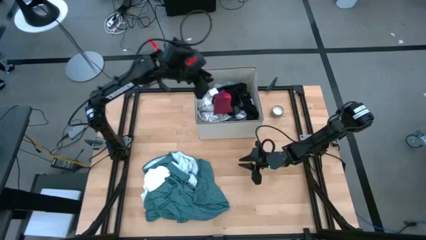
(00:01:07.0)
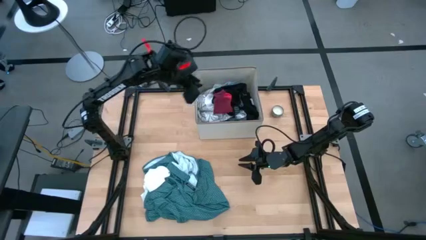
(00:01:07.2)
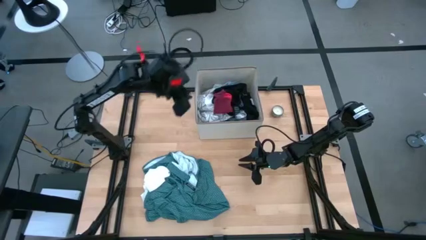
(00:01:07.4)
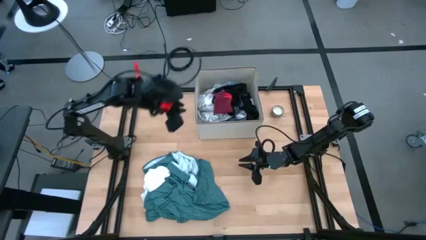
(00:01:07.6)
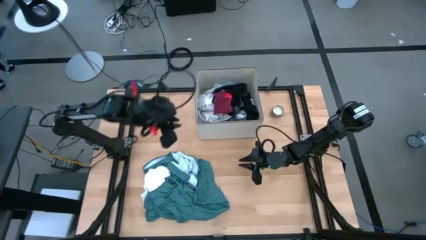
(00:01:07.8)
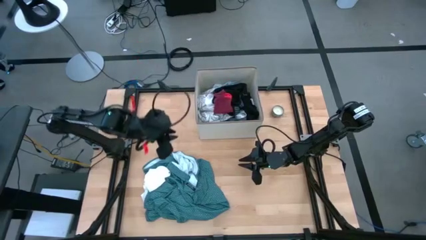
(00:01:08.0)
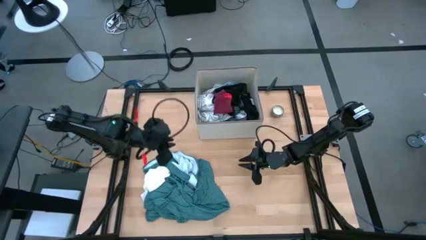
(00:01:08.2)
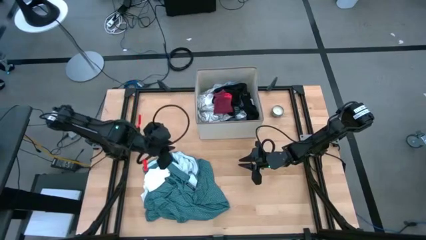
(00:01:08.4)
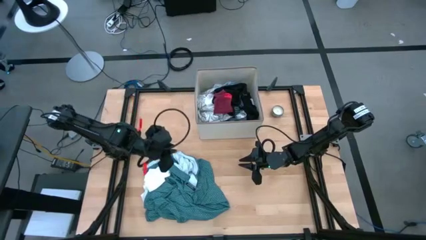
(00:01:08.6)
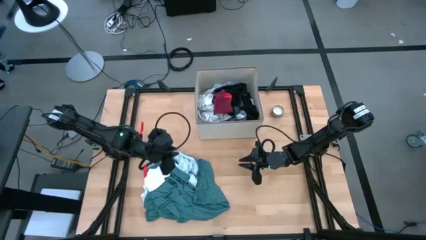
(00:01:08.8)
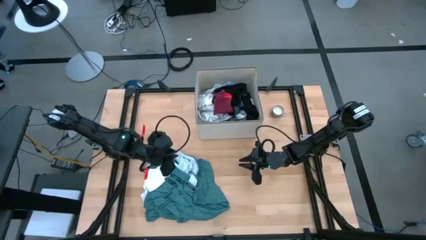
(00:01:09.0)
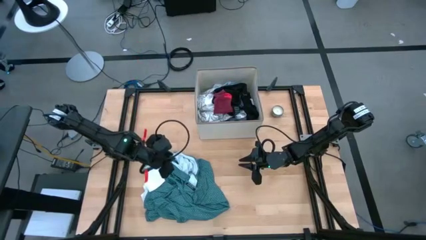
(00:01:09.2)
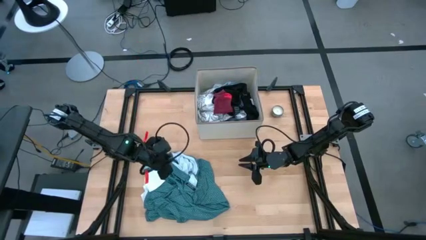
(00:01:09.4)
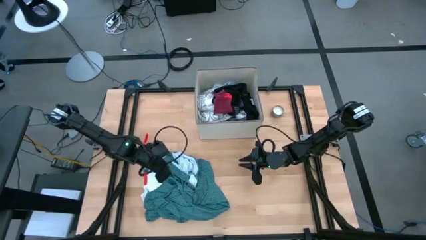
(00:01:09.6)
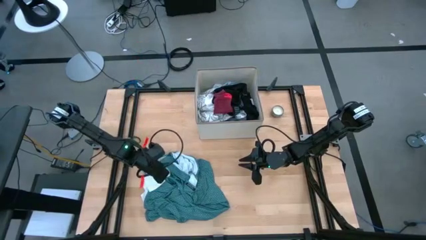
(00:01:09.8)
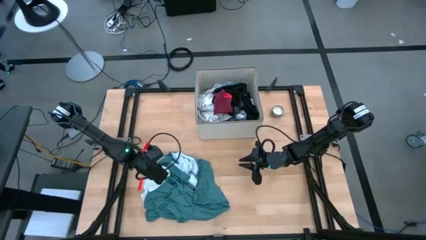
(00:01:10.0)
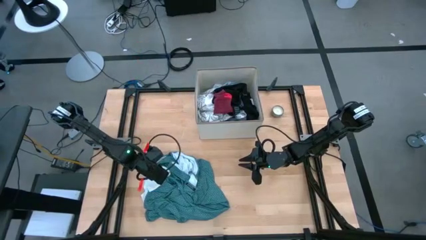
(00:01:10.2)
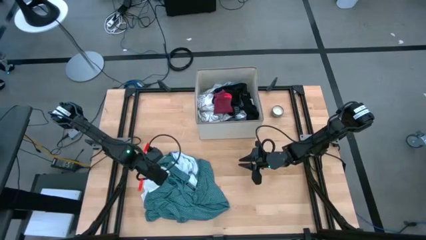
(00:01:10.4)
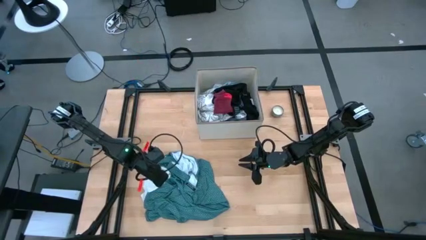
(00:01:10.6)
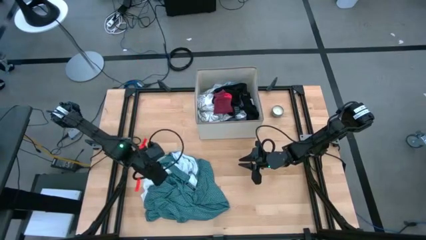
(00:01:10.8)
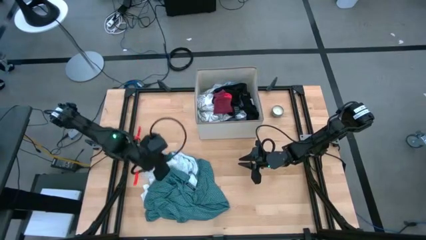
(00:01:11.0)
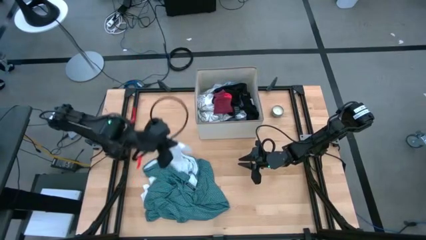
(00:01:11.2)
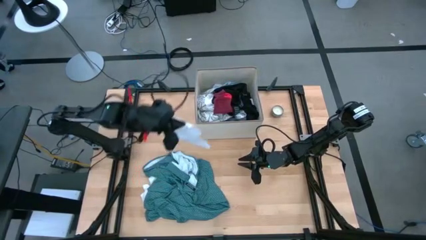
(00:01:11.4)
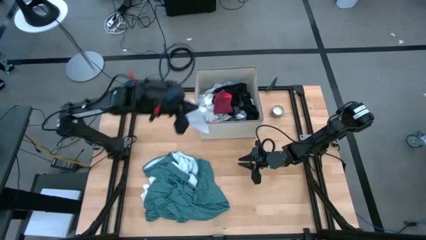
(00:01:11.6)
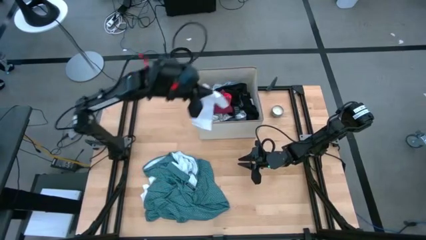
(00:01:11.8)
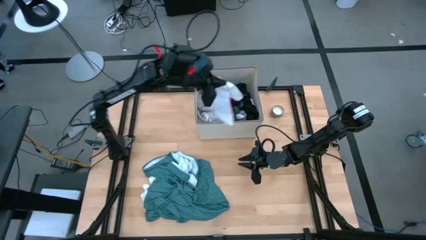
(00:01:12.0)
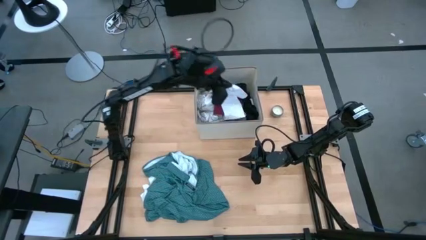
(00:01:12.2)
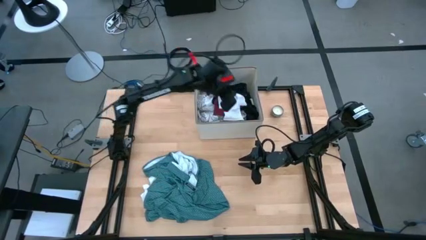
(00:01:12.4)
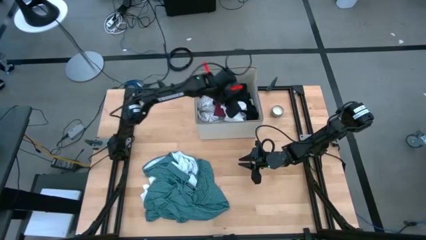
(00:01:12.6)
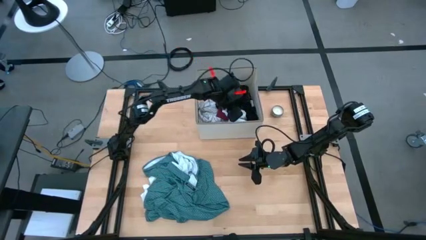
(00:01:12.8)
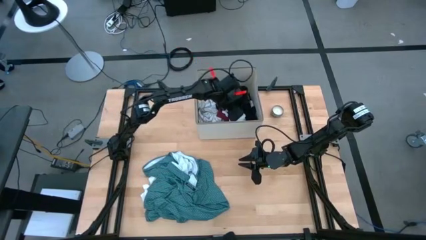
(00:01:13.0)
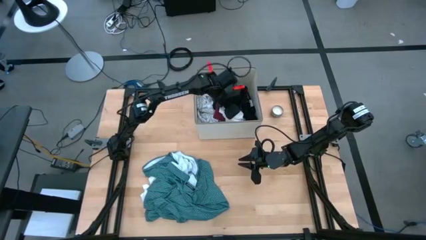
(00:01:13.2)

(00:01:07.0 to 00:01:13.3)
Task: Sort clothes
Put the white sock into the bin

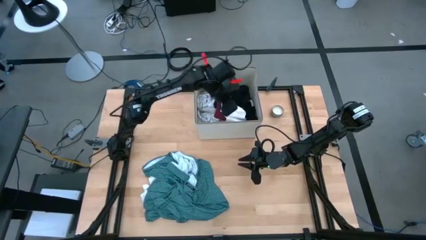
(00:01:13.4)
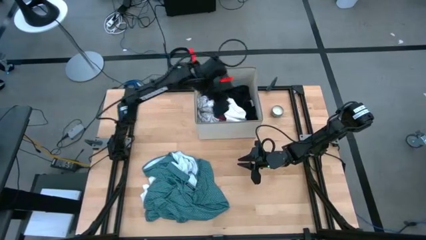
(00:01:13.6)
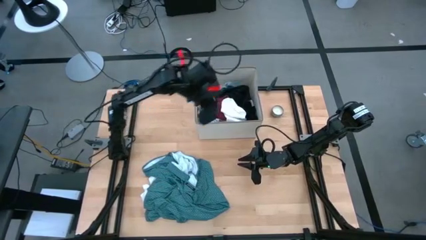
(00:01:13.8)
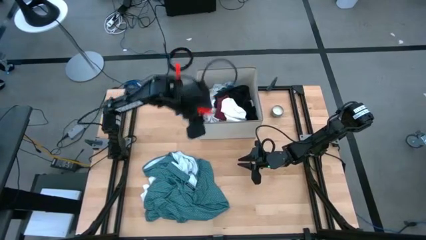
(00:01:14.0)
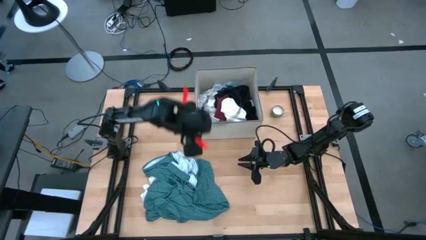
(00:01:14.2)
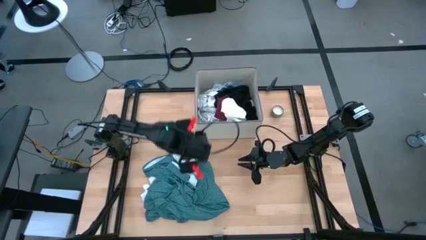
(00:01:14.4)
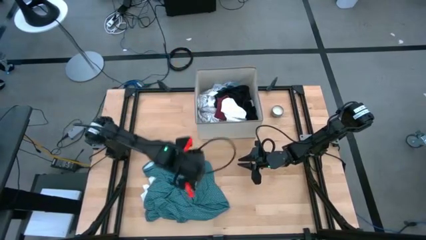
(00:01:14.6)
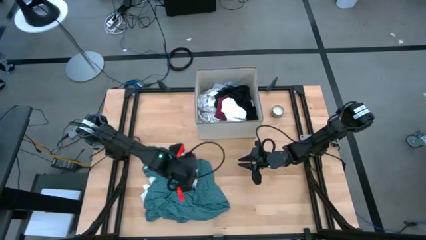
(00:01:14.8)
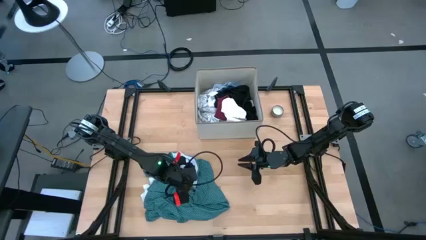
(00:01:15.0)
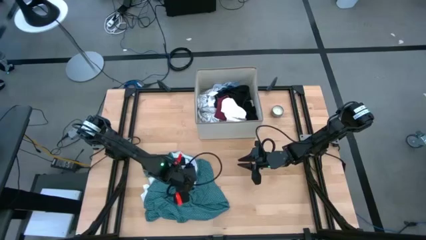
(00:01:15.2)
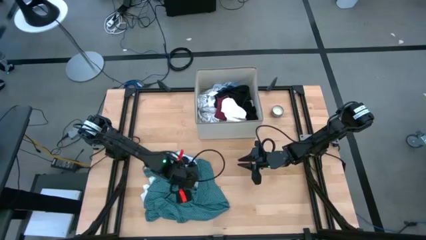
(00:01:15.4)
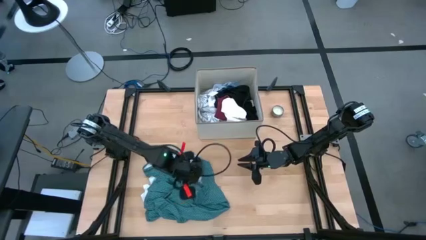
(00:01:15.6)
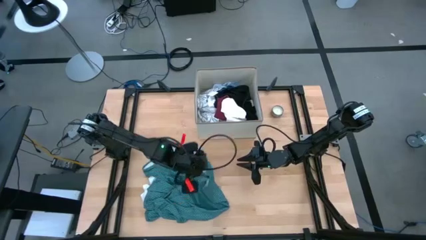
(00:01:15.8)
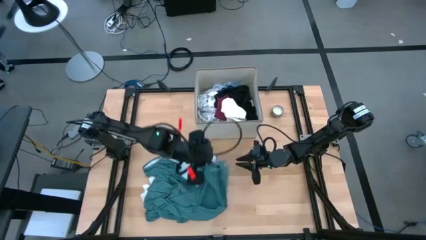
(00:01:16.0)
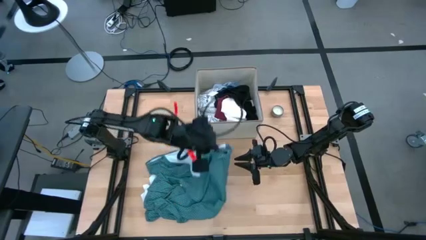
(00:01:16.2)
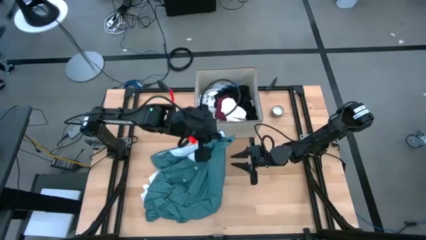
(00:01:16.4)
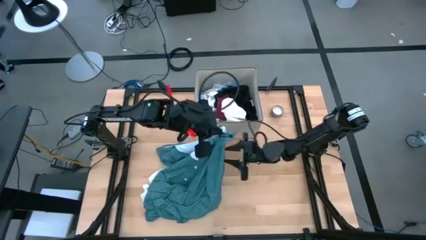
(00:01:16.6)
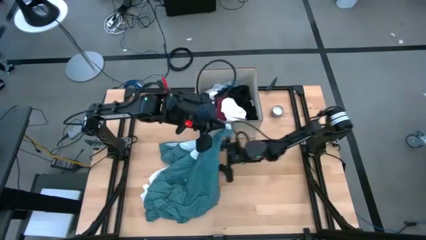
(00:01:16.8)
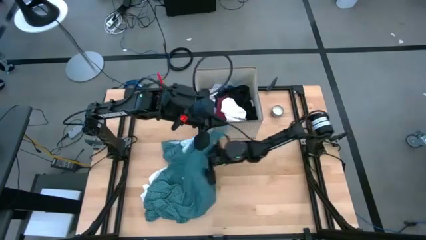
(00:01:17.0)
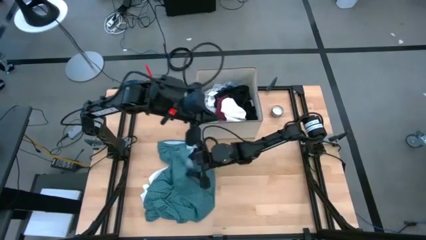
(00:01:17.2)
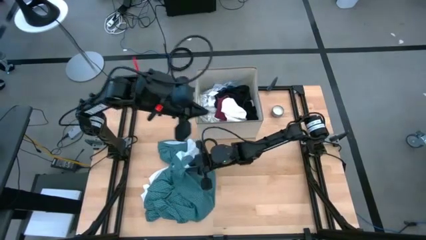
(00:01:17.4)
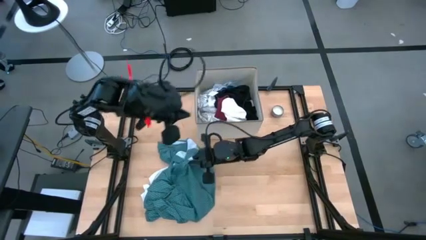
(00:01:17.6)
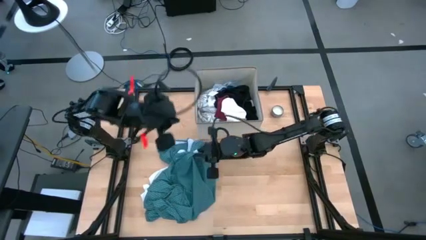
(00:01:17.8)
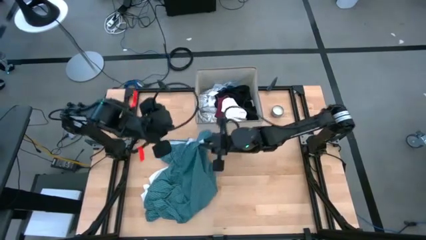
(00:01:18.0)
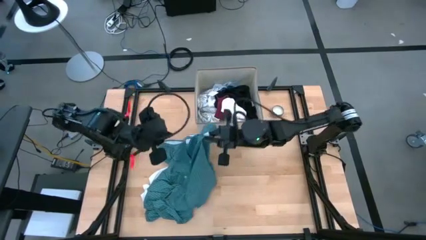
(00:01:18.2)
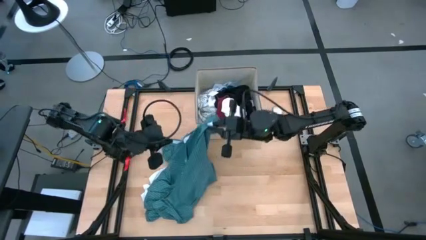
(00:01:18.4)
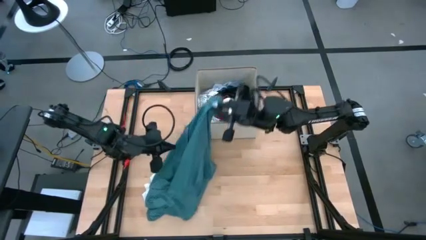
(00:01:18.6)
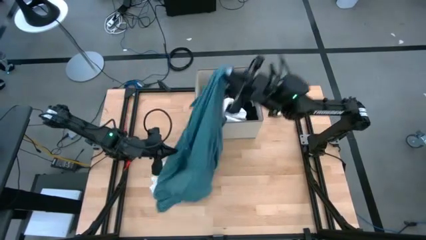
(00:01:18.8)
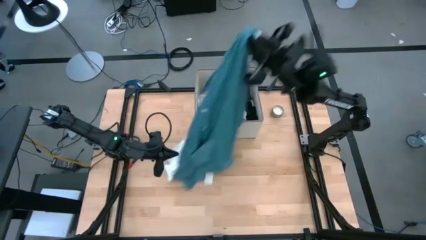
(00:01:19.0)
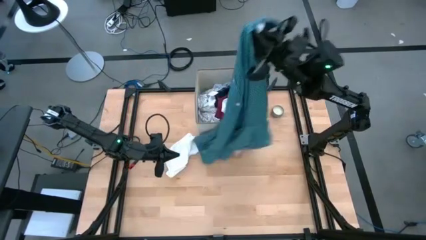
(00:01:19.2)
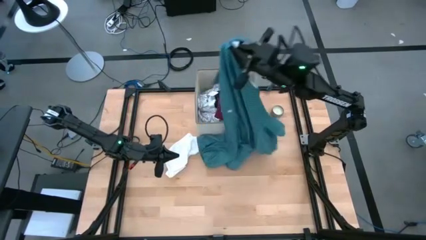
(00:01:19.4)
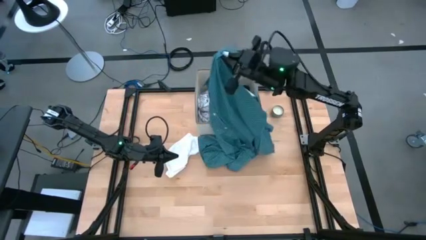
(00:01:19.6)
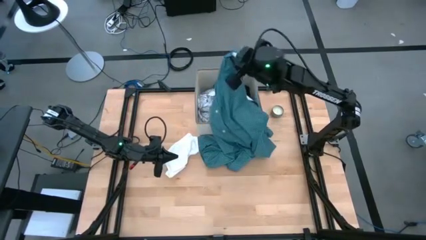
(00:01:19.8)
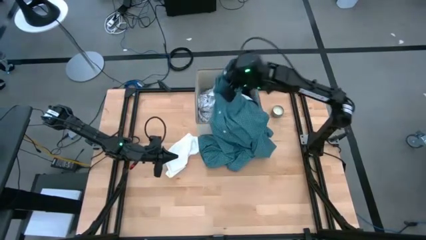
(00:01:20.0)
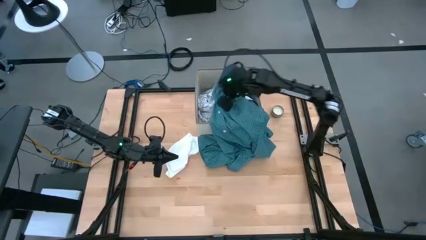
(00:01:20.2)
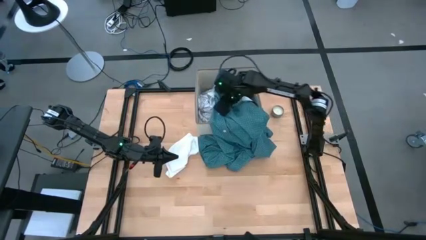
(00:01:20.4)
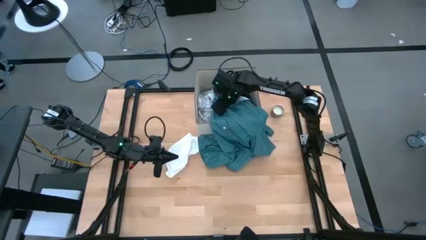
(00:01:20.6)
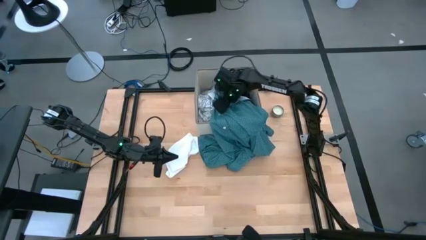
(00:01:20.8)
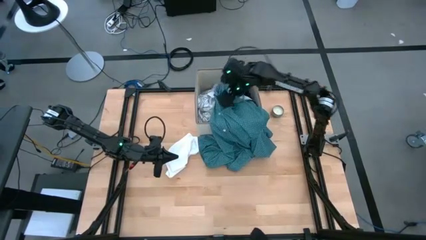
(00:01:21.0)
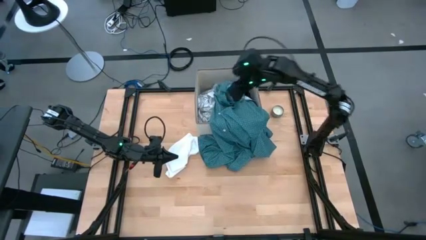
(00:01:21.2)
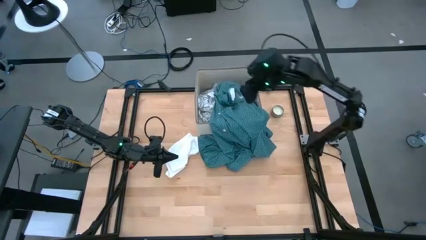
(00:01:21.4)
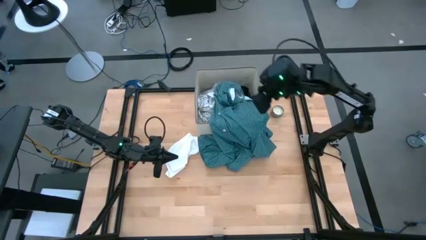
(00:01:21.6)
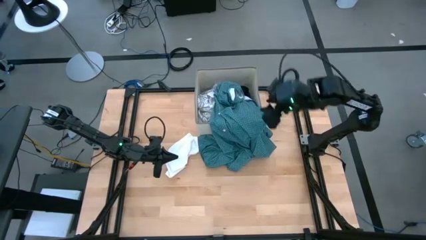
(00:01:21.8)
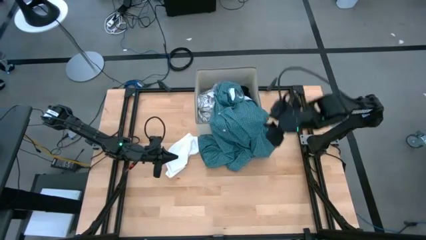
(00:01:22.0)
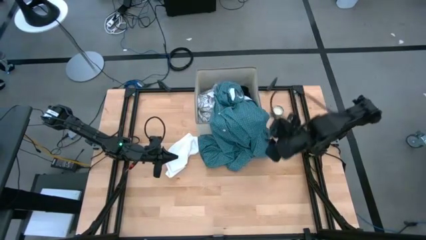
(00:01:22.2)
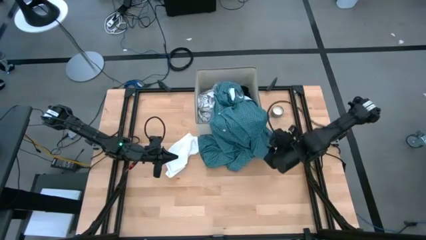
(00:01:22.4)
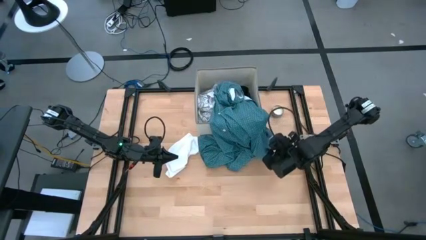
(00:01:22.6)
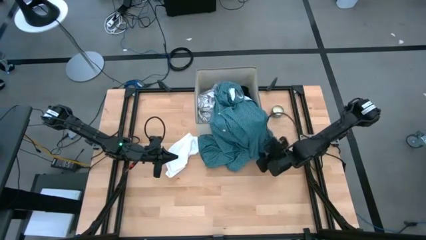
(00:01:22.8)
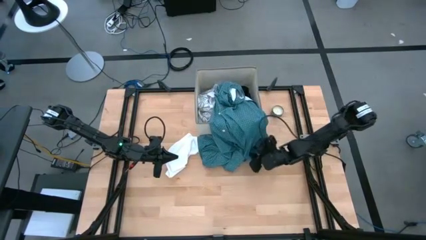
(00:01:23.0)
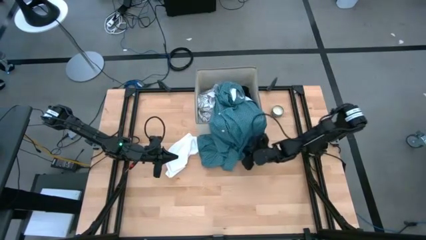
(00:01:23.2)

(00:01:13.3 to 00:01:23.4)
Put the green patterned shirt into the bin

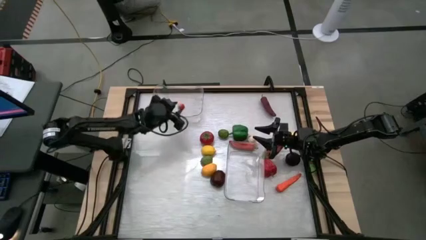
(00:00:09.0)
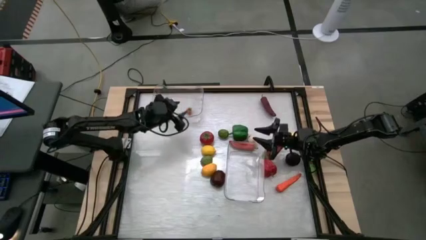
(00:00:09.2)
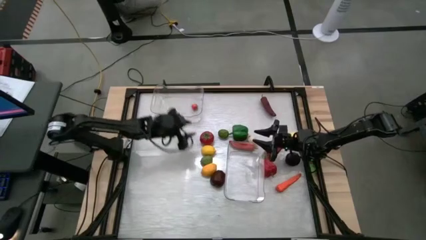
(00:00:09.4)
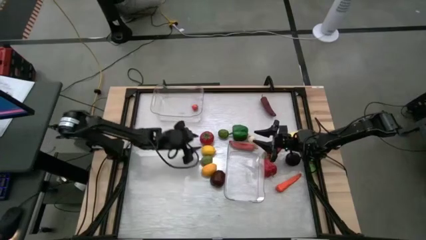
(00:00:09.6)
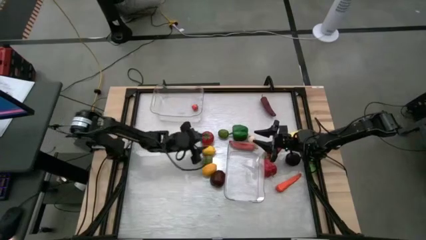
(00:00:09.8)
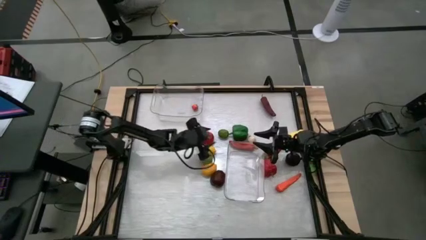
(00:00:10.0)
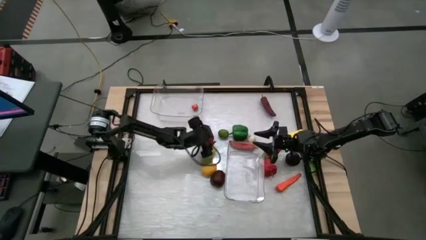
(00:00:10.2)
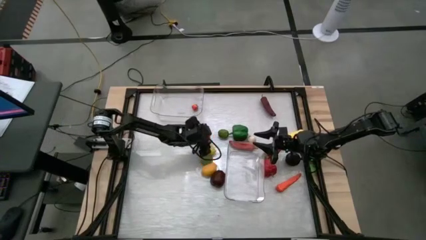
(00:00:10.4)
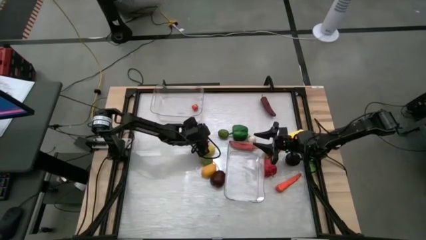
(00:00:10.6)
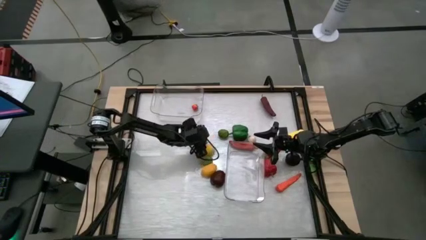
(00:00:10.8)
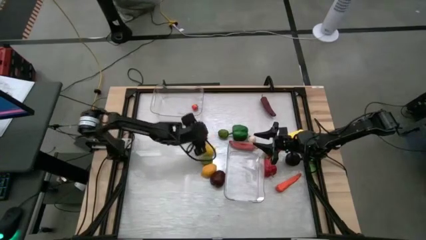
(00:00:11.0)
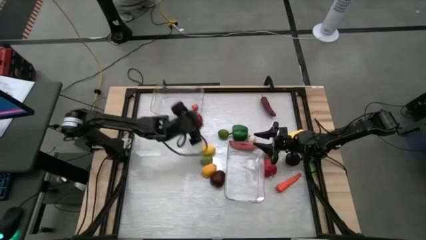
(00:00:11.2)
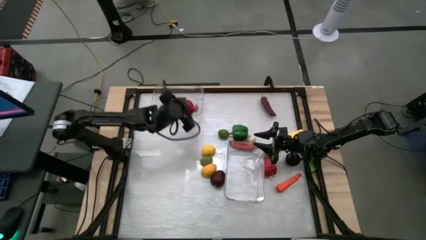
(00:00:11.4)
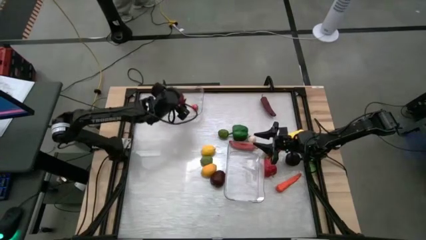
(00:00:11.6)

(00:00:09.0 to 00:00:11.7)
Task: Sort produce into baskets
Put the red tomato into the top transparent bin
